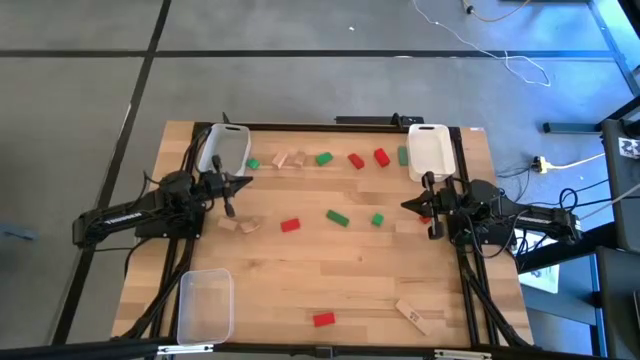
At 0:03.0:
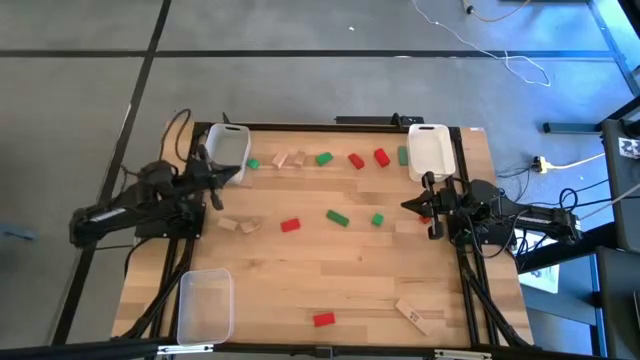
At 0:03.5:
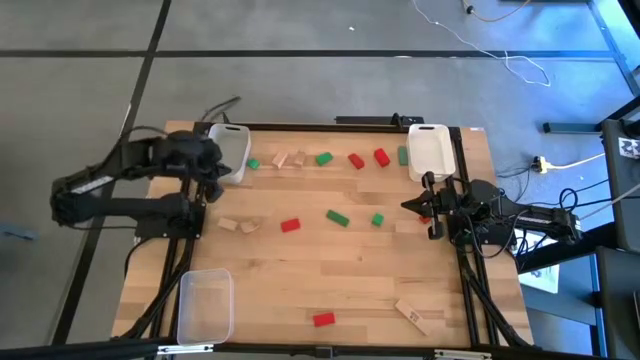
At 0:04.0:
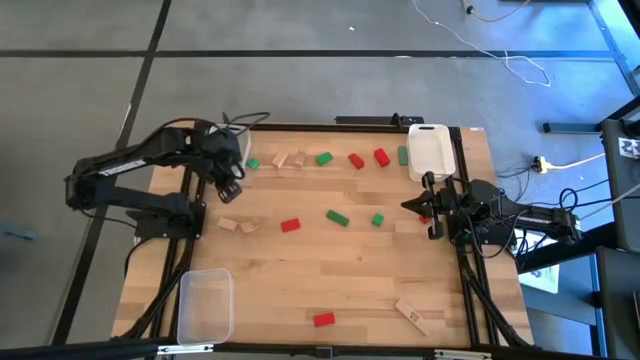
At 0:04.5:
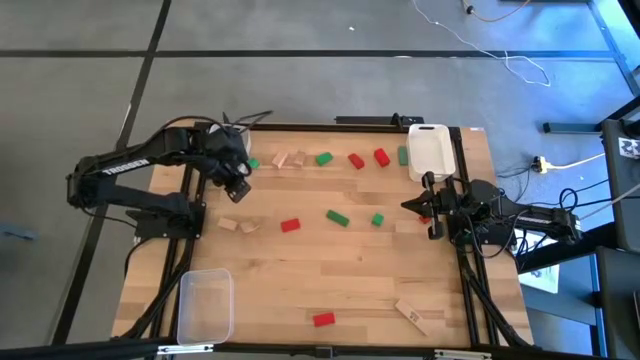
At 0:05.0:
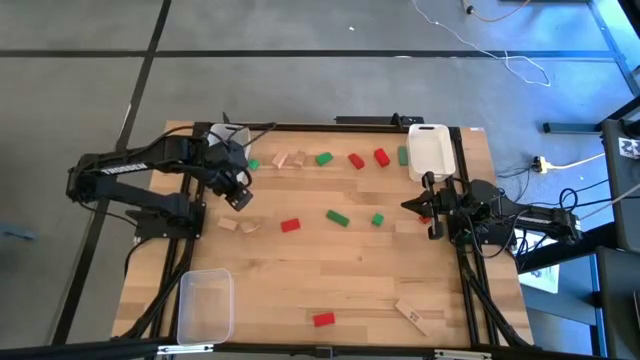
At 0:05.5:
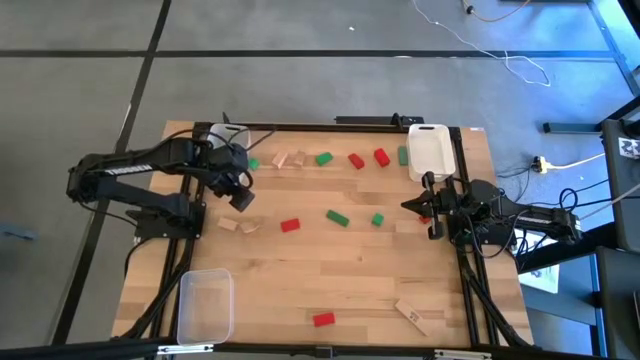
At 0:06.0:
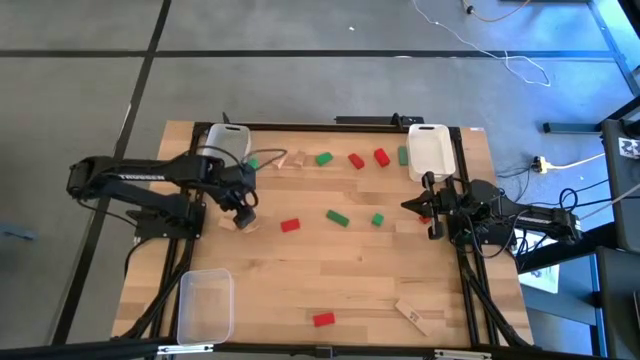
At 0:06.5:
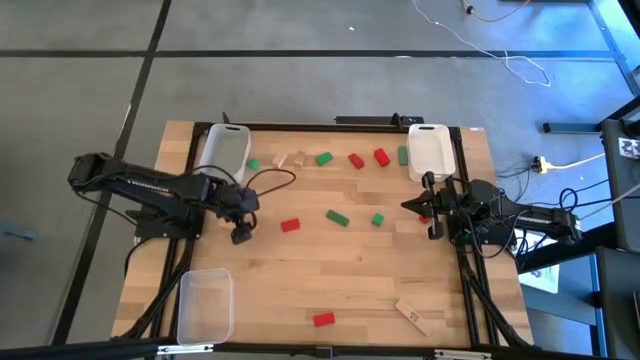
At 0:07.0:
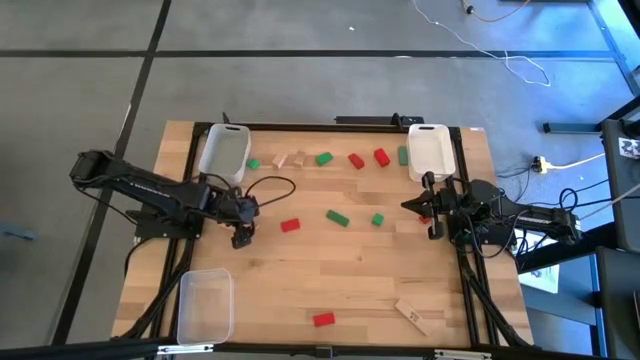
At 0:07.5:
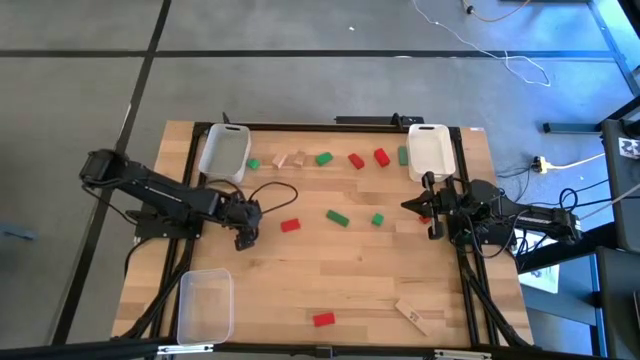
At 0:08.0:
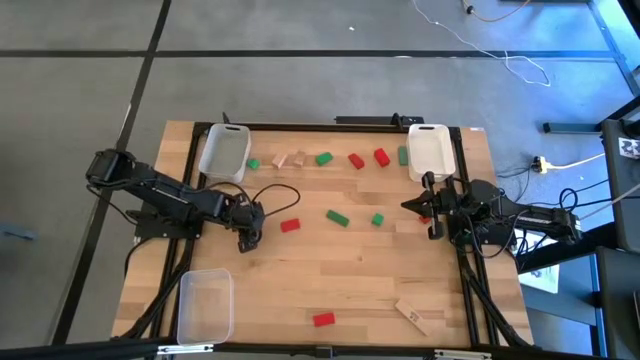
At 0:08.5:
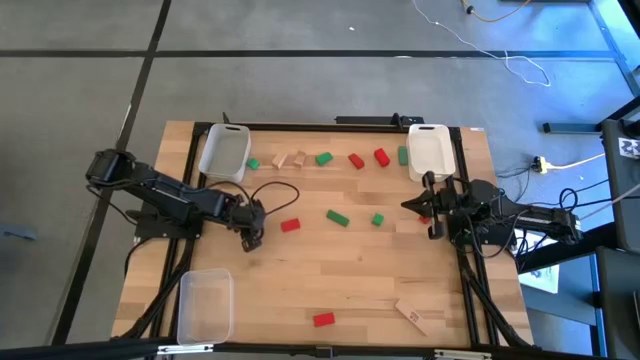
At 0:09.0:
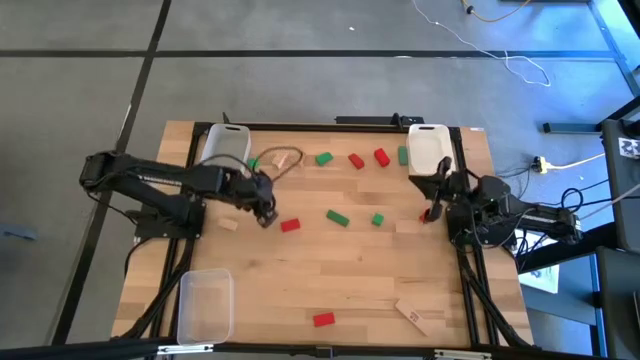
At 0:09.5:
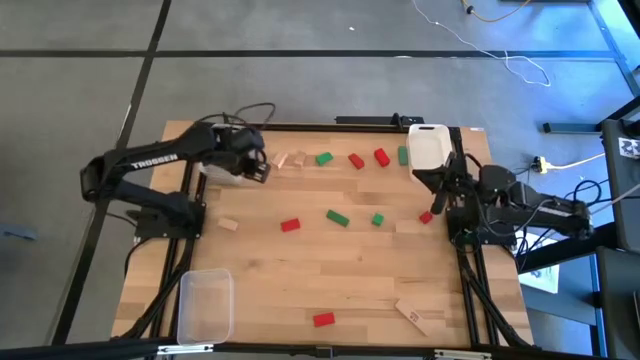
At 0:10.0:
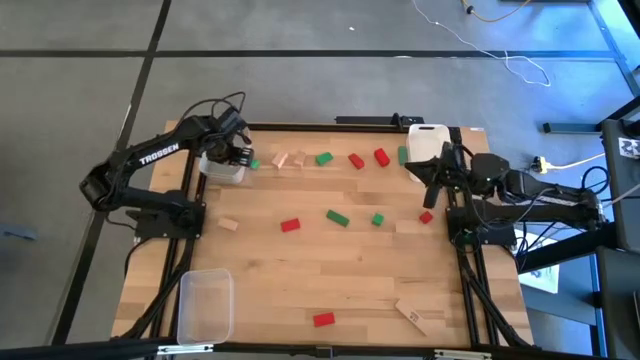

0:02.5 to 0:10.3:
Task: Sort & place blocks by color
Put the brown block into the gray bin

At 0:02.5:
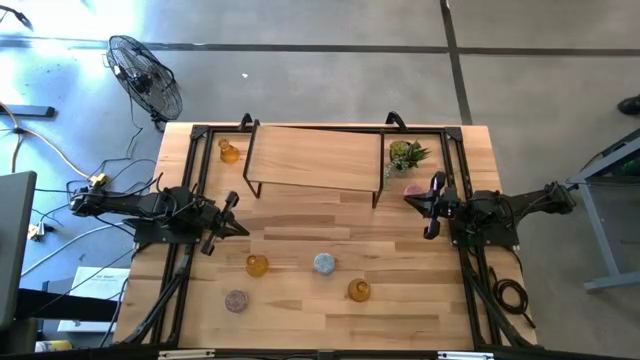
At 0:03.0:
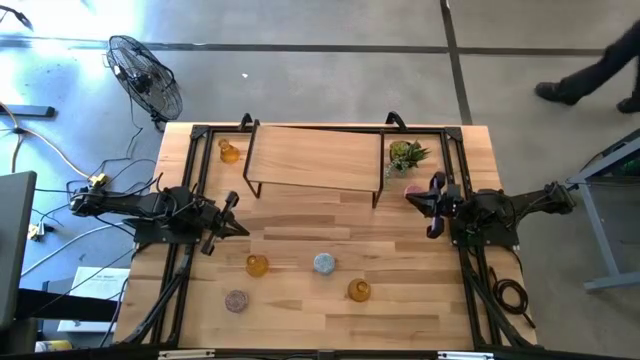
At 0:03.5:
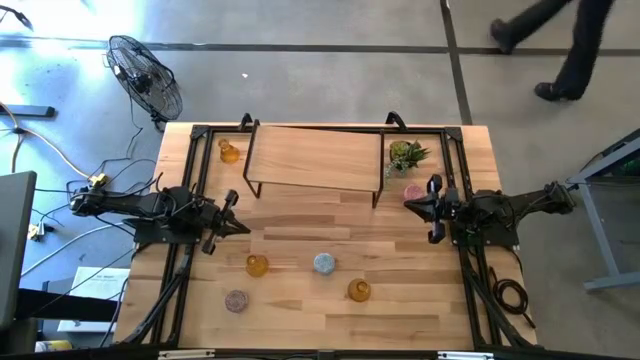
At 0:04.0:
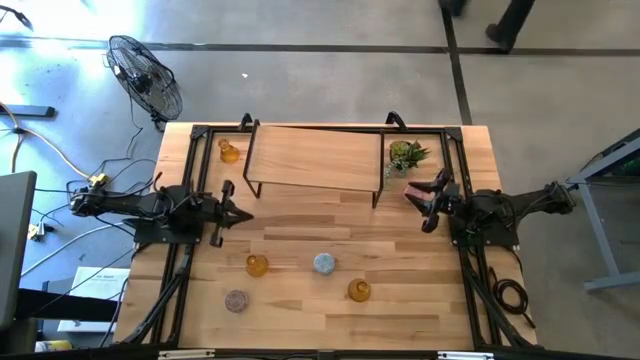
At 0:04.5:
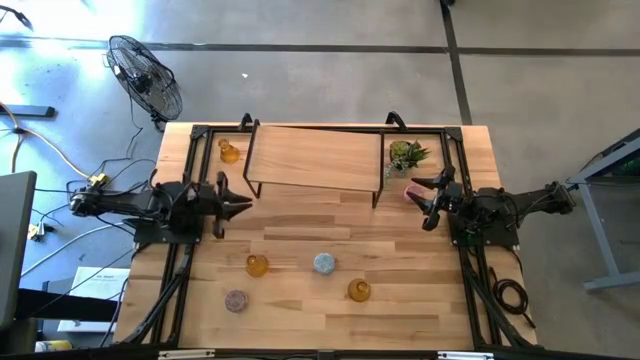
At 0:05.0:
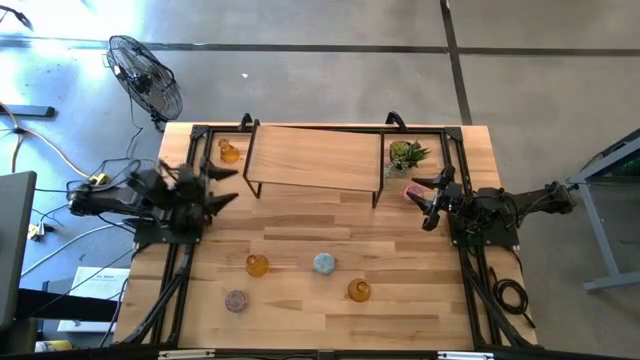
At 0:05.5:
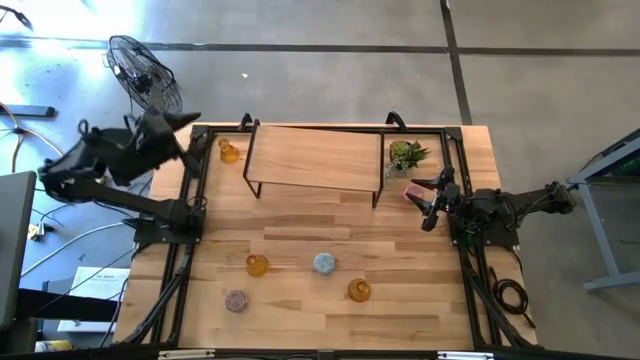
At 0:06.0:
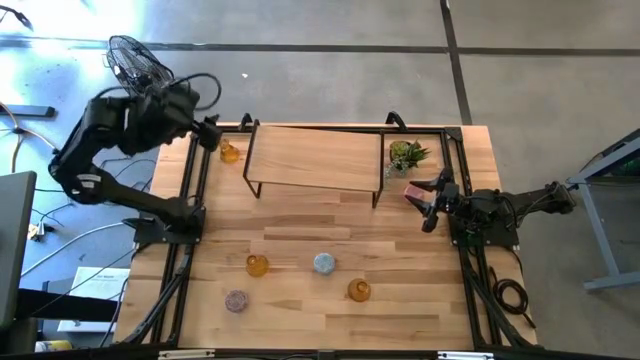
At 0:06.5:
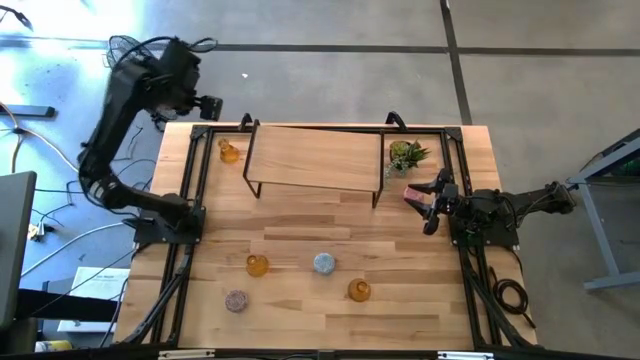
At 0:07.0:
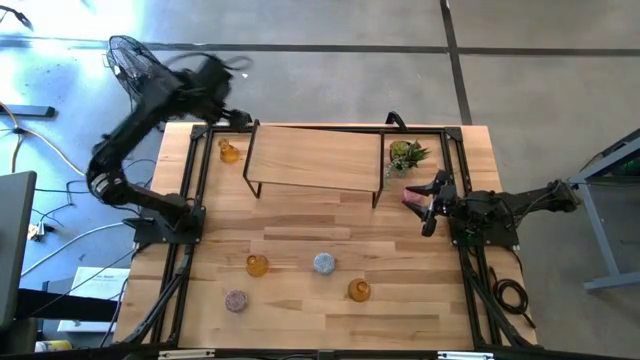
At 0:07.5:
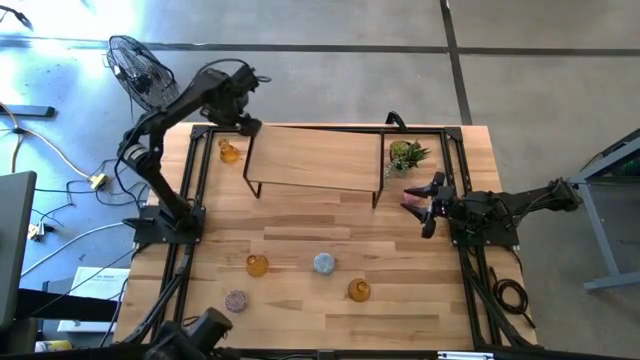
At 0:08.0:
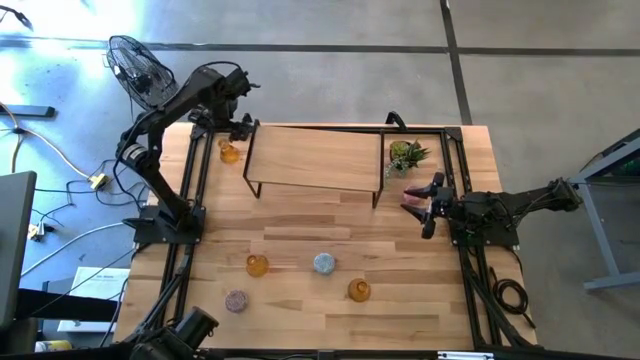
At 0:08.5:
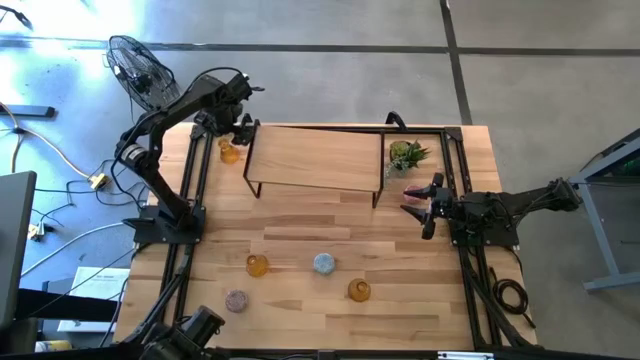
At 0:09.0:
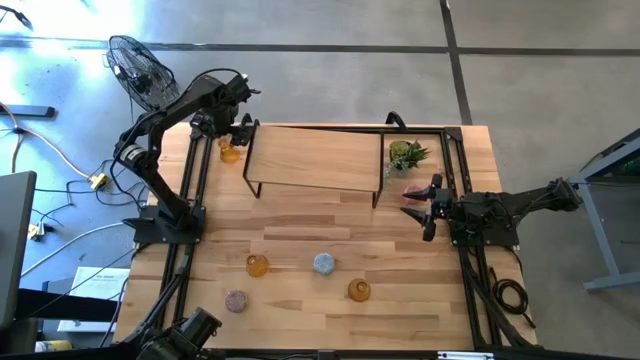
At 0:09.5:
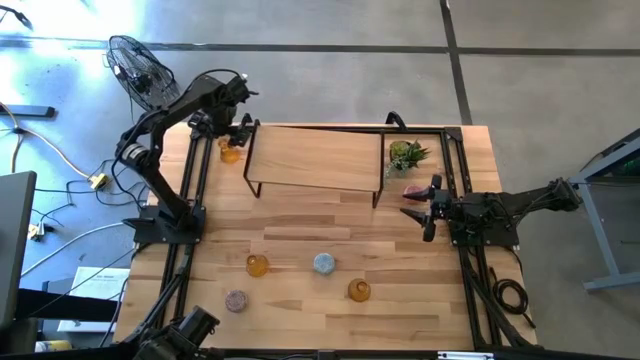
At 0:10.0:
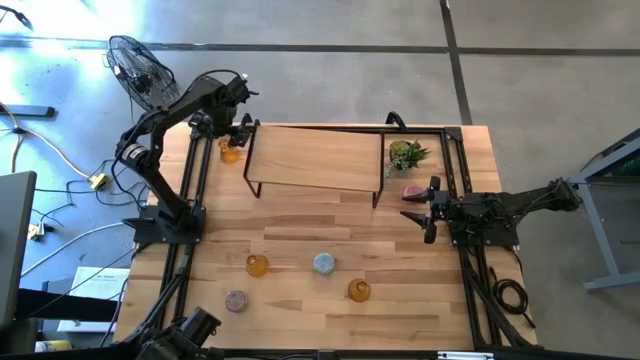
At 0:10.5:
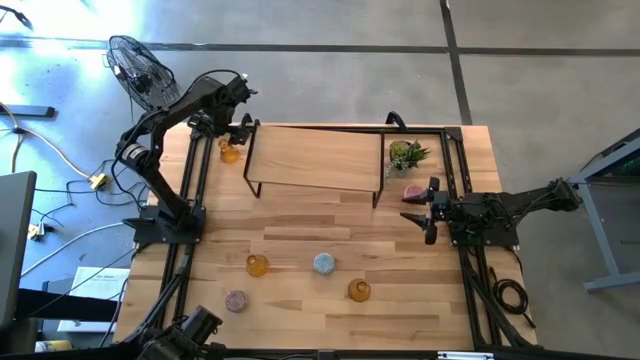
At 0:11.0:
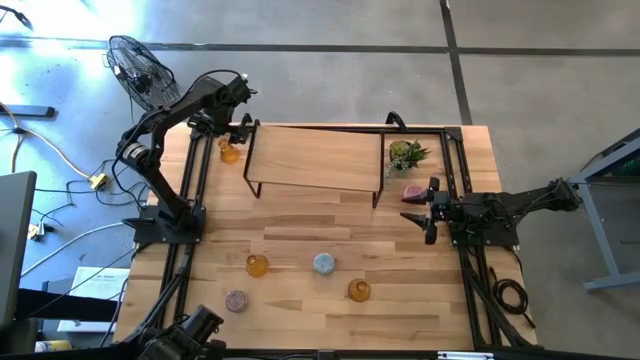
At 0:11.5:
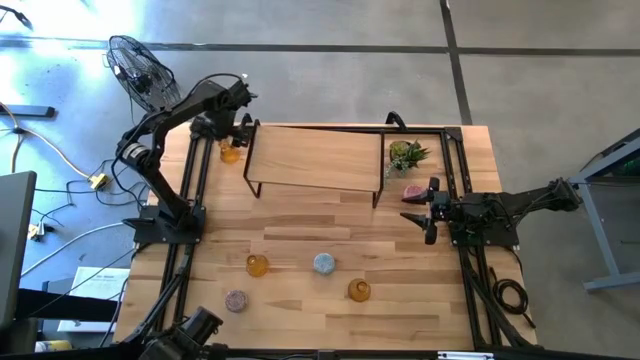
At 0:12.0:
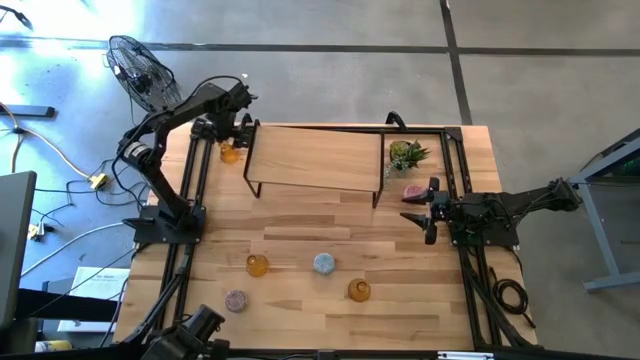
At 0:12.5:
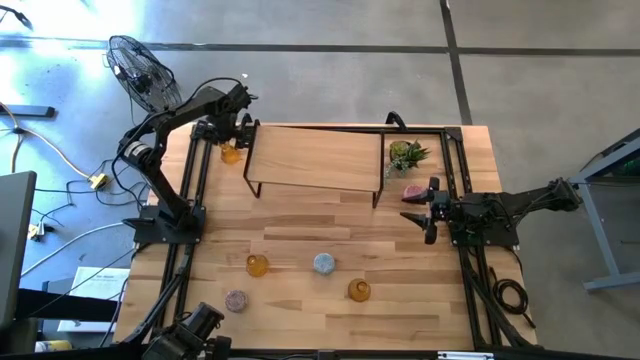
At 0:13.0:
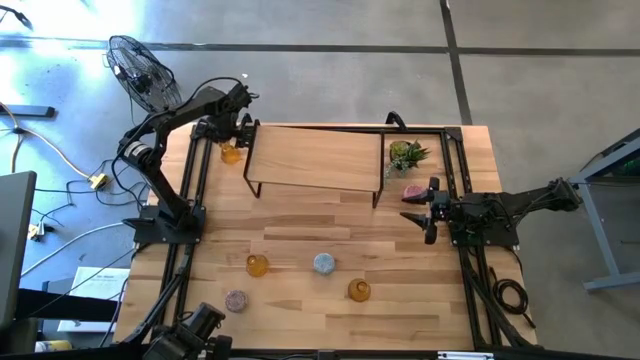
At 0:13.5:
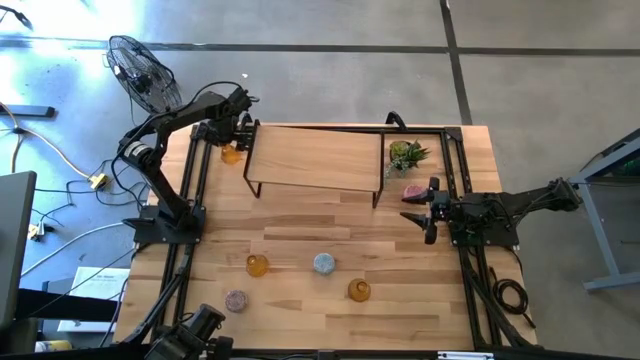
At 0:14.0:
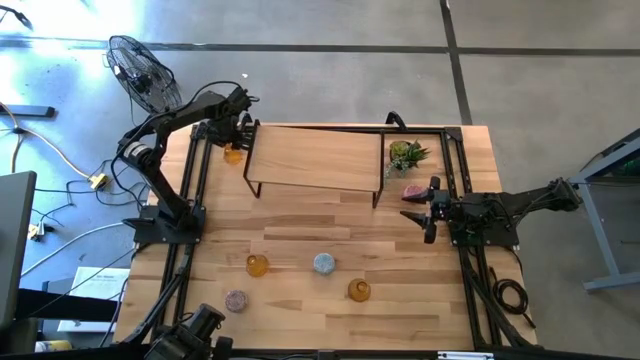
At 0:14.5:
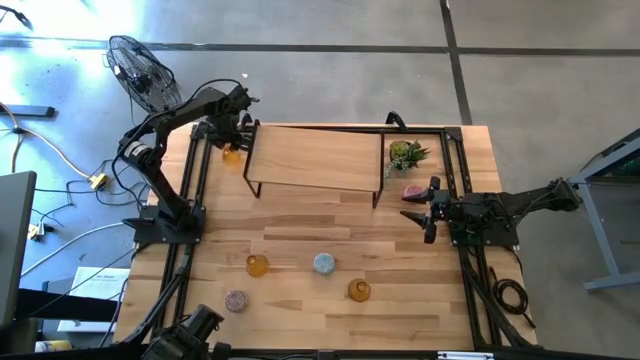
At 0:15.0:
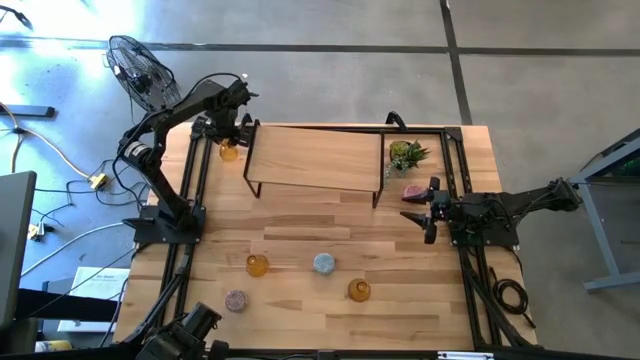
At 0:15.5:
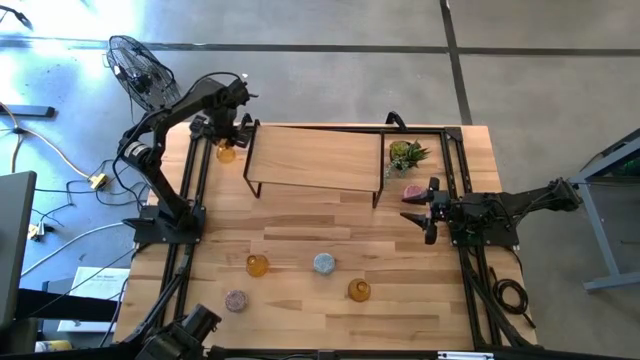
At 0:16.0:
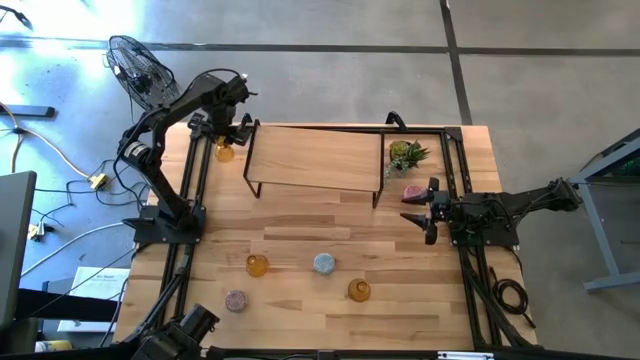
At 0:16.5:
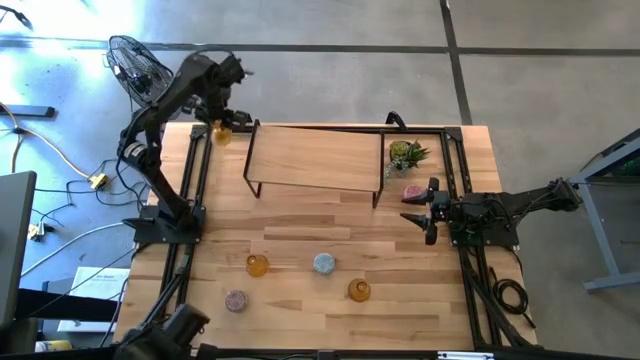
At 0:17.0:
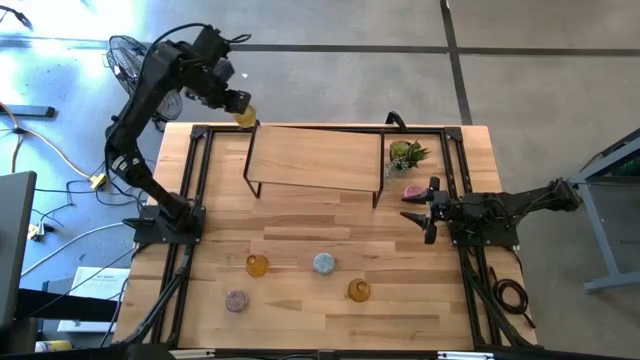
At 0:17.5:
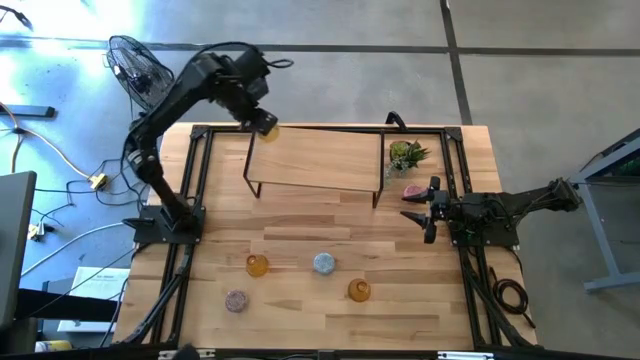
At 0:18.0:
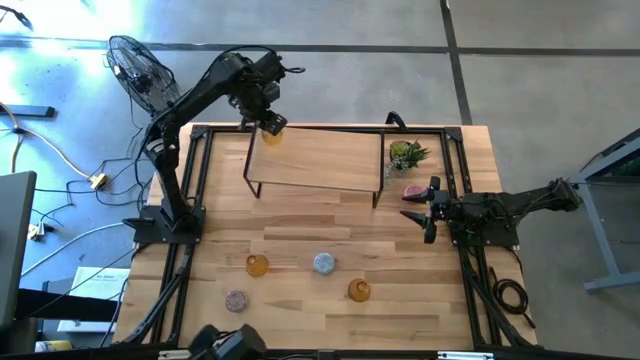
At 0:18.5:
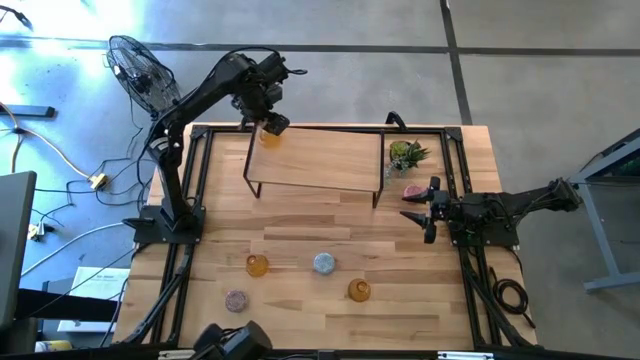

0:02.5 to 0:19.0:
Task: Pick & Place candle stick holders
Put the top yellow candle holder on the shelf
